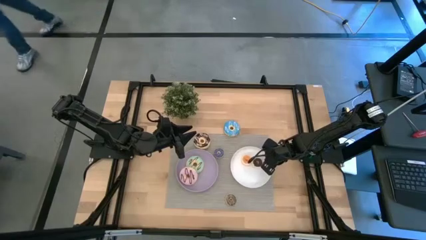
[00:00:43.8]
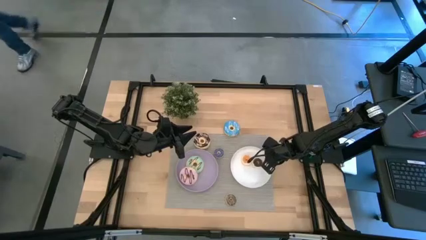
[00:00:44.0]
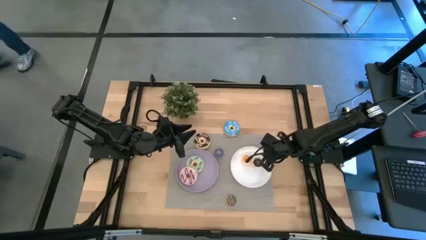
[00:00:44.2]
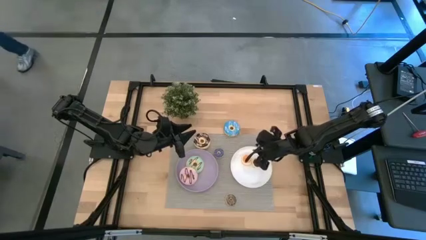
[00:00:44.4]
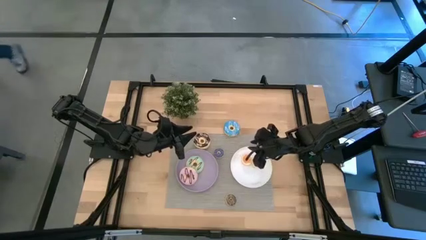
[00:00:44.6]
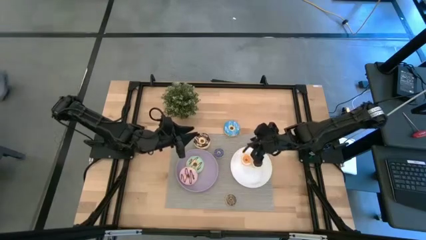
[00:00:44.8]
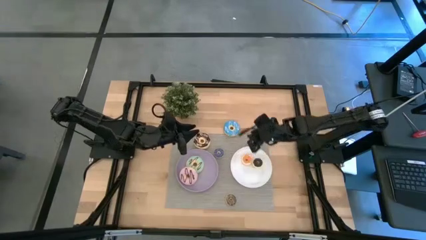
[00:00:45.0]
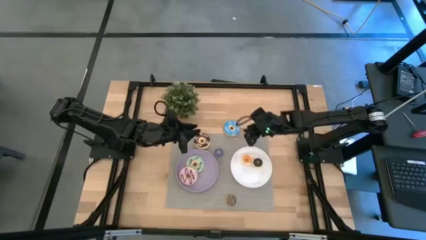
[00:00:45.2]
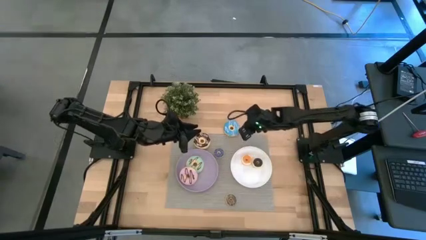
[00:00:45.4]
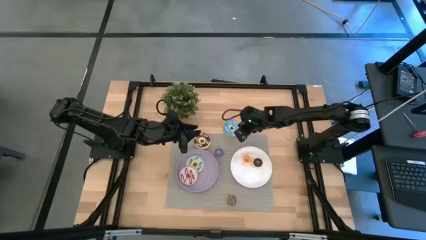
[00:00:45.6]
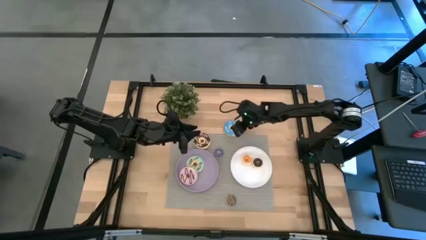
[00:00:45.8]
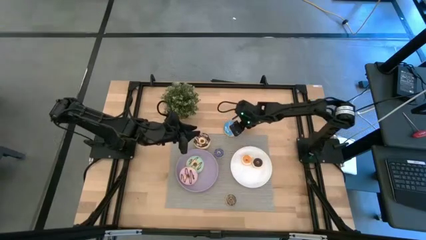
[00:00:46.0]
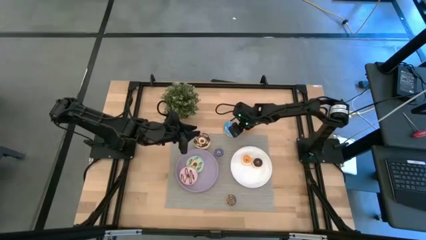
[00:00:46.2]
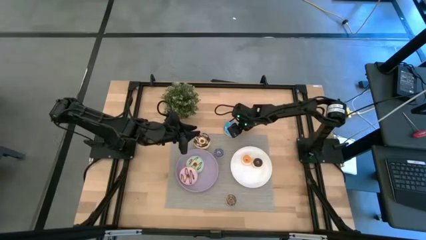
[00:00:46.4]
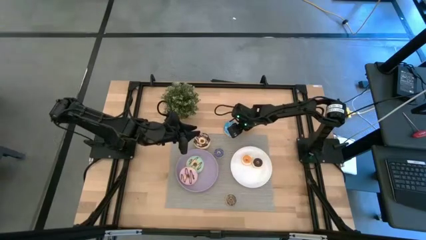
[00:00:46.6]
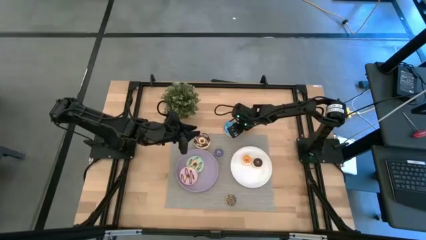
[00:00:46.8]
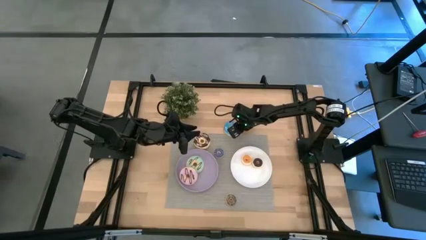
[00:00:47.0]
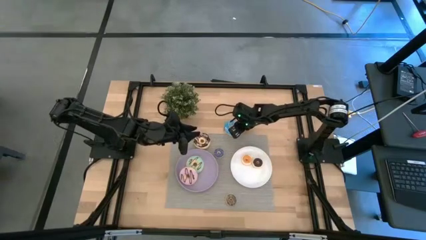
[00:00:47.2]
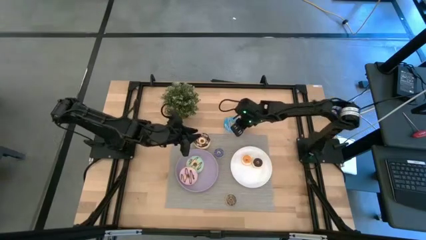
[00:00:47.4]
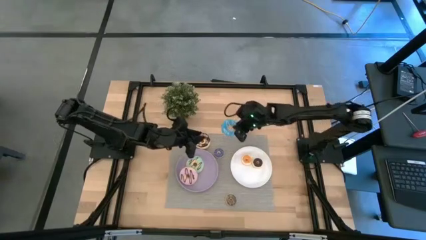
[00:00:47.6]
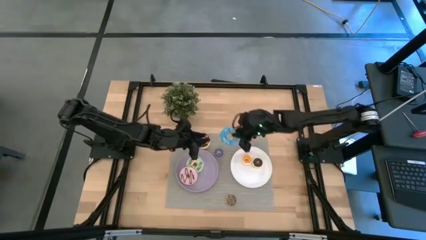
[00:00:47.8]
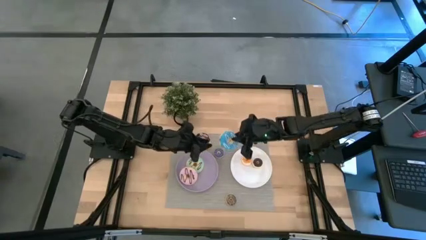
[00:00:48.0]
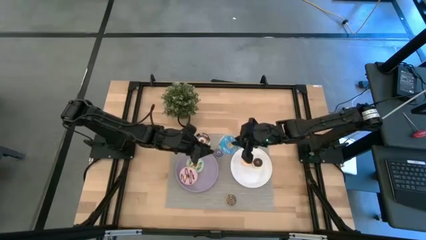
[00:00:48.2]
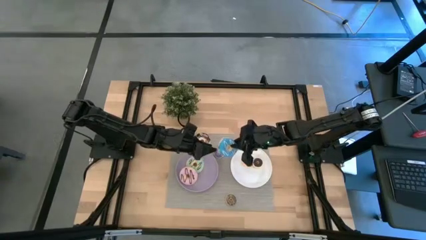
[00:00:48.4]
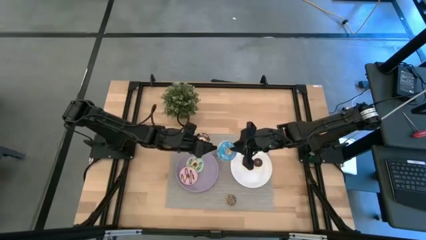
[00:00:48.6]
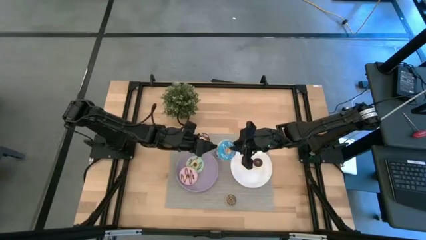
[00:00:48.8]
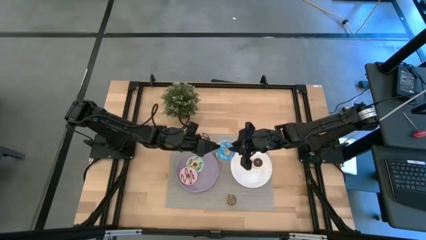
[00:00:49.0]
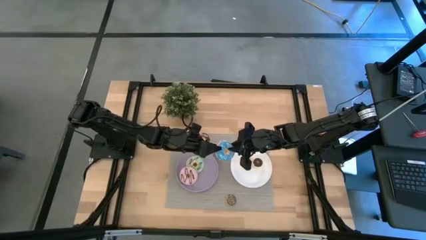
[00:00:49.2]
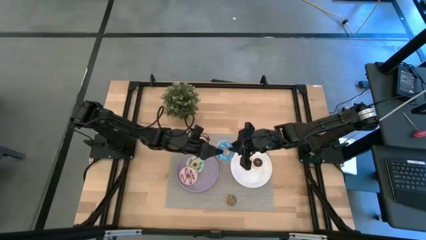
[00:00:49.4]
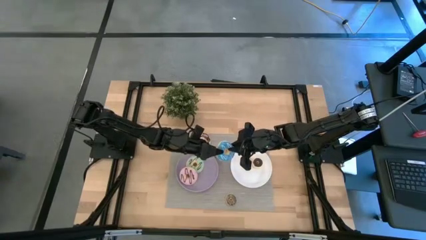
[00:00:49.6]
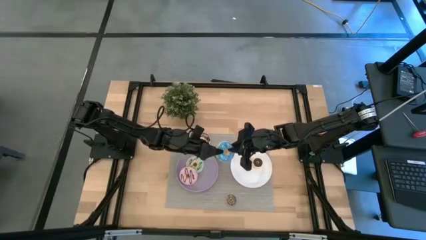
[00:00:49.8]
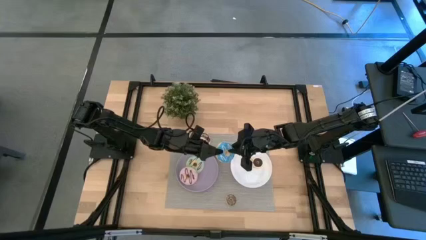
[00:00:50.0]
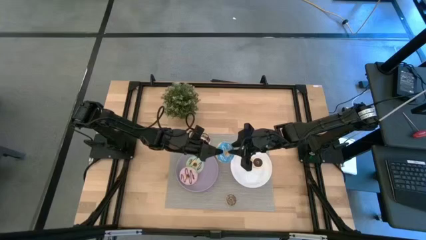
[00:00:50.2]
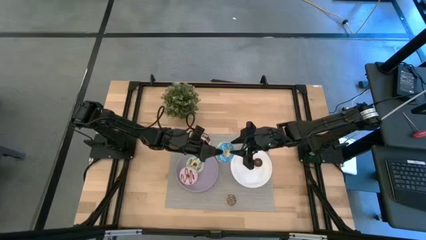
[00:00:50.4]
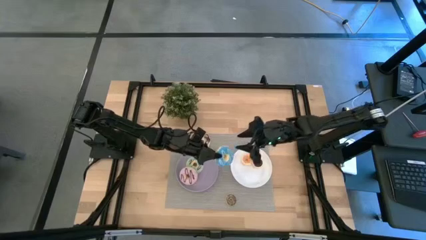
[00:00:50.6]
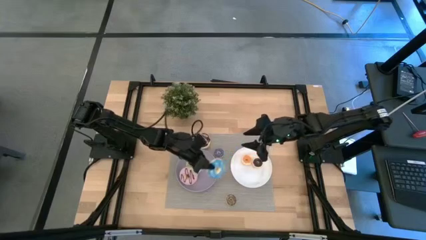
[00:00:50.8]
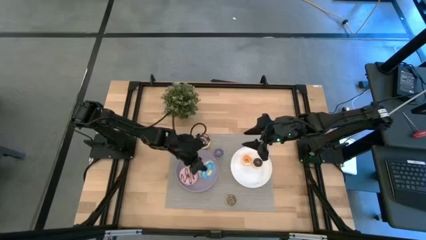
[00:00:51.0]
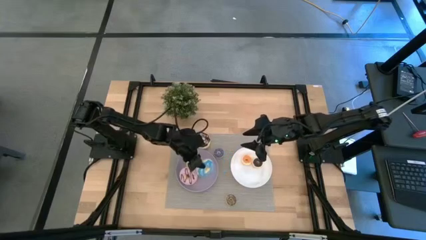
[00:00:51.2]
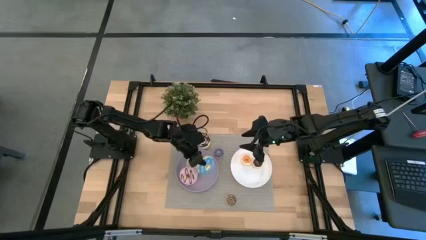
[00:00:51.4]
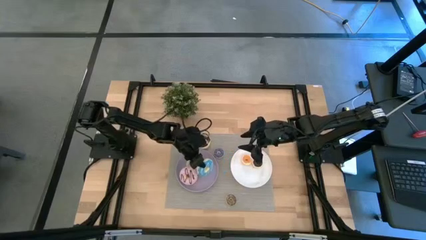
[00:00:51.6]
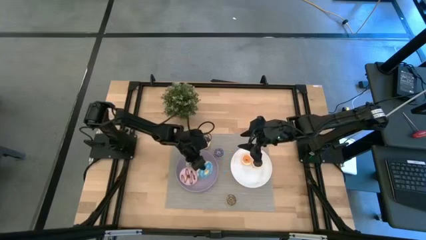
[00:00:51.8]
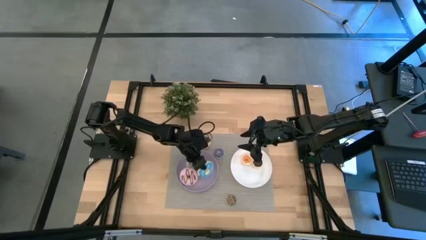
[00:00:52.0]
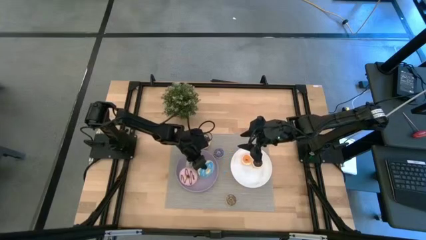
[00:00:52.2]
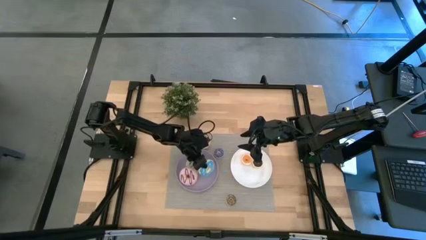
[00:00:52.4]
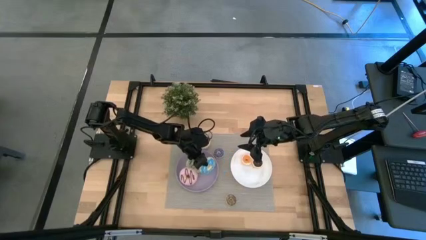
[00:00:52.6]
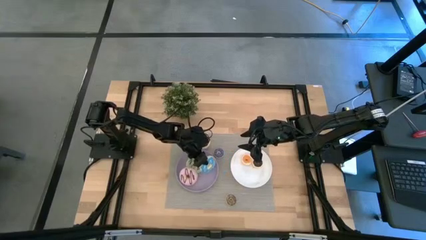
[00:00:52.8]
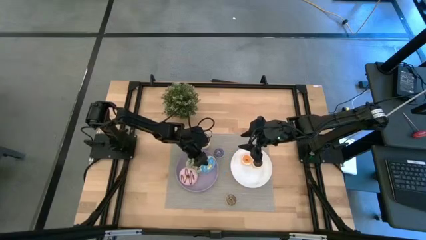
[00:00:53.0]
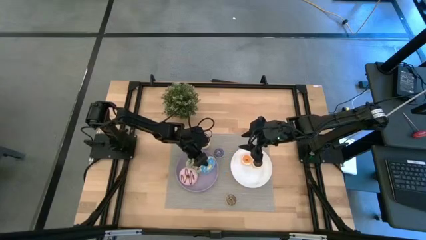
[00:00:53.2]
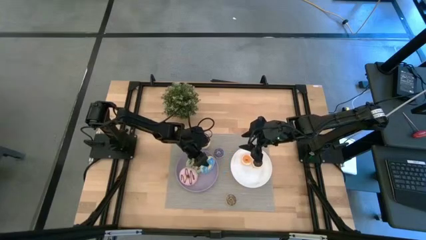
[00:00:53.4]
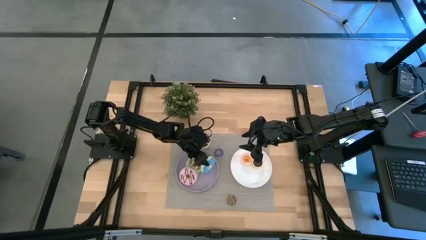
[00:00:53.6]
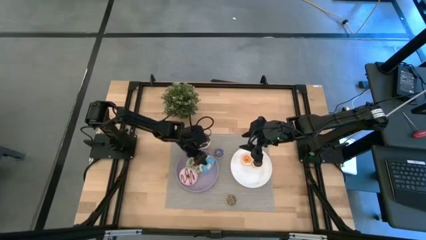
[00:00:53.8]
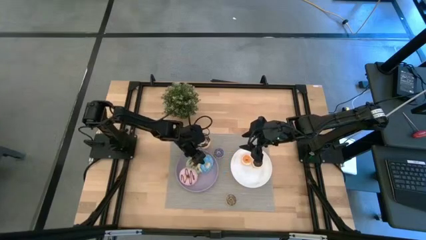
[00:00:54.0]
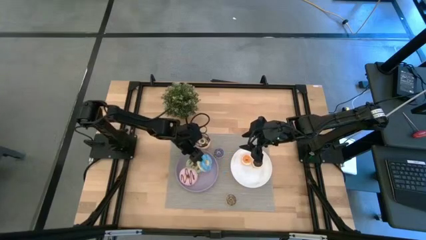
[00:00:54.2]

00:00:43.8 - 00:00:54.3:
Task: Pick & Place donuts
Put the large blue donut on the purple plate

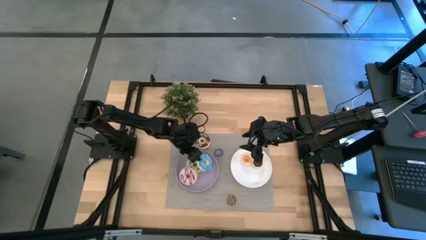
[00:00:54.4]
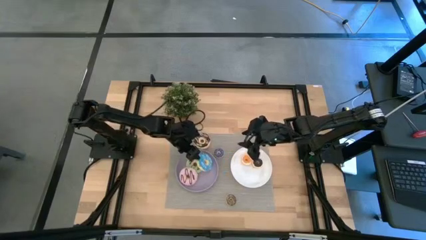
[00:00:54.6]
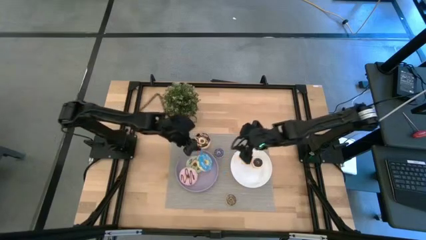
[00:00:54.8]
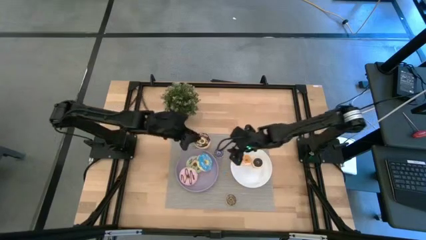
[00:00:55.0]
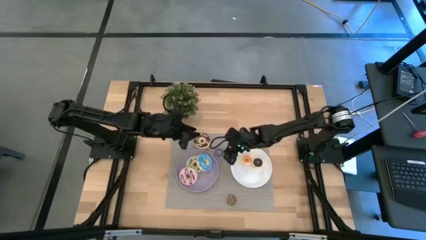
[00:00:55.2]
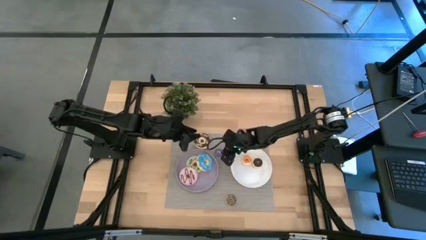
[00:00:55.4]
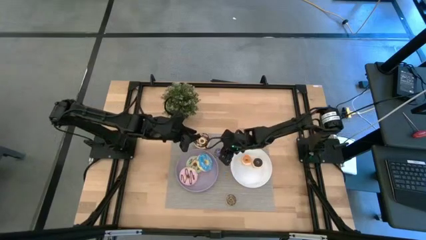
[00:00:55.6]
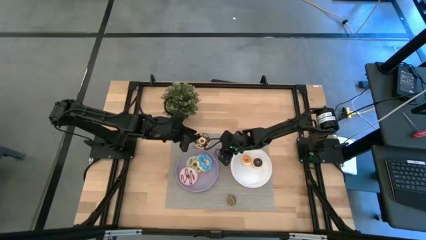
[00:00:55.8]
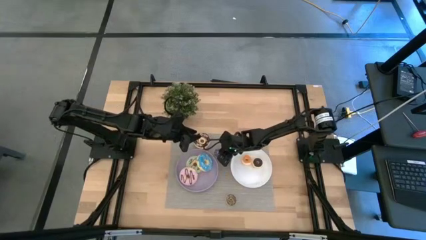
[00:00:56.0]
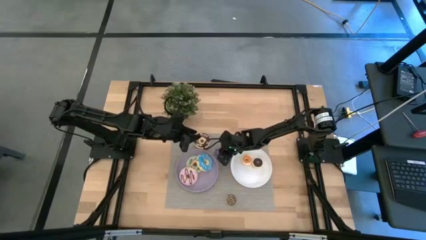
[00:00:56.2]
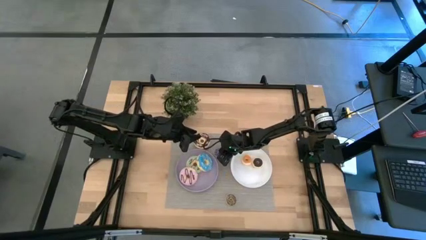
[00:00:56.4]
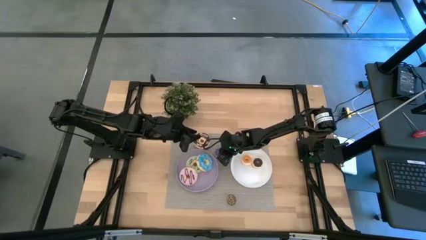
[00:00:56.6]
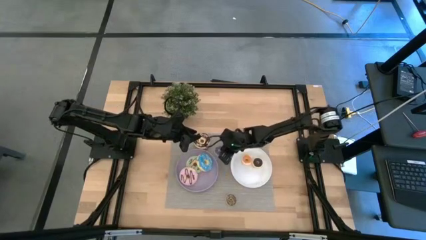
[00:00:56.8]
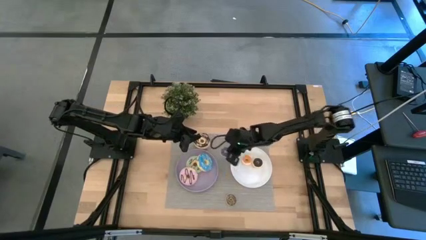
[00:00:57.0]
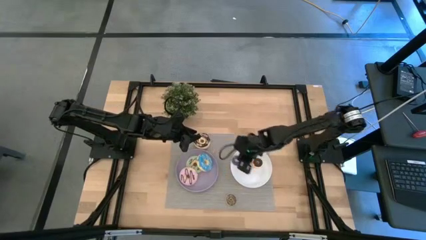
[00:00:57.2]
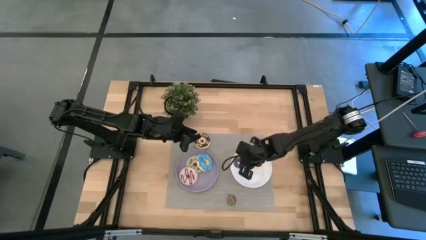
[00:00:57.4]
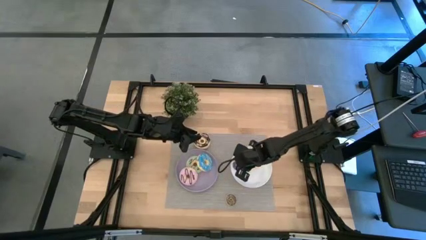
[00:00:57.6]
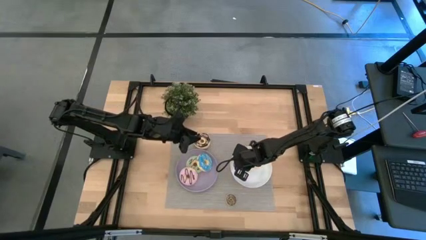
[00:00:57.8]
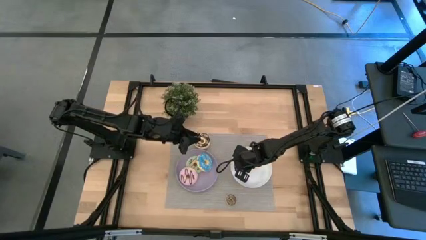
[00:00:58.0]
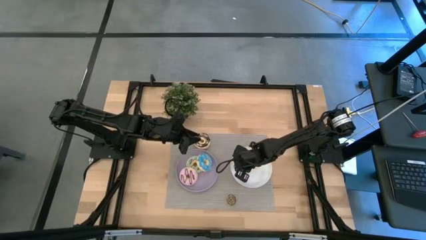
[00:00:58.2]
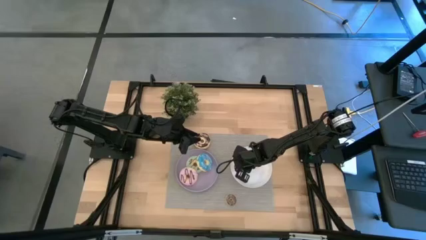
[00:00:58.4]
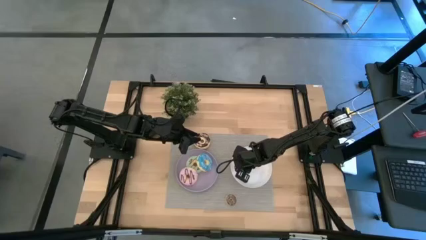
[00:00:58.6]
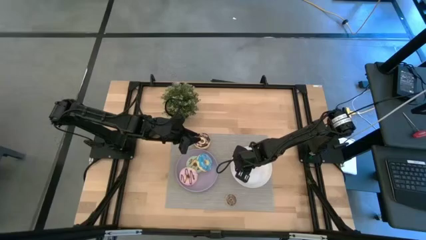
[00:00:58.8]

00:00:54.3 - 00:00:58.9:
Put the small purple donut on the white plate

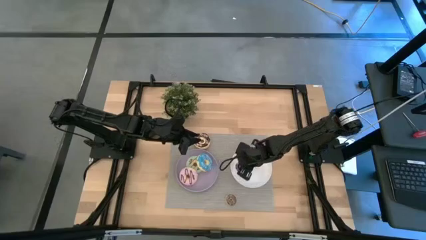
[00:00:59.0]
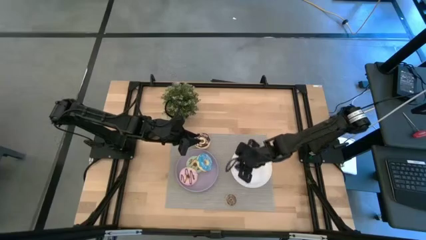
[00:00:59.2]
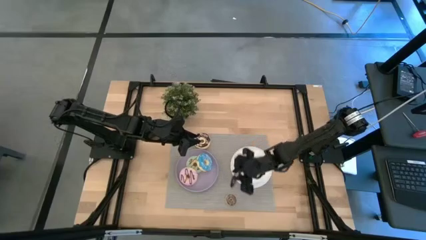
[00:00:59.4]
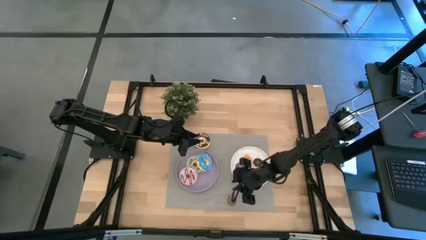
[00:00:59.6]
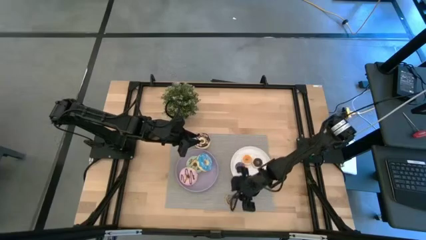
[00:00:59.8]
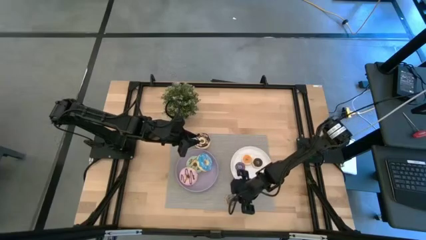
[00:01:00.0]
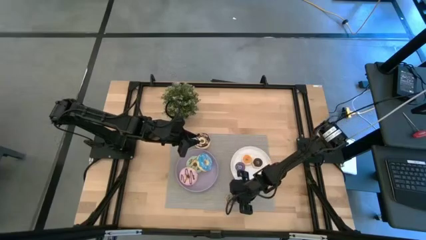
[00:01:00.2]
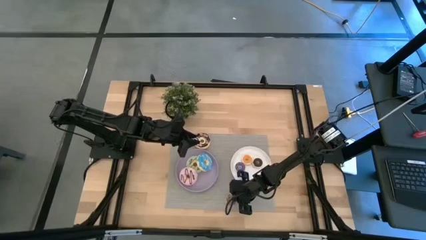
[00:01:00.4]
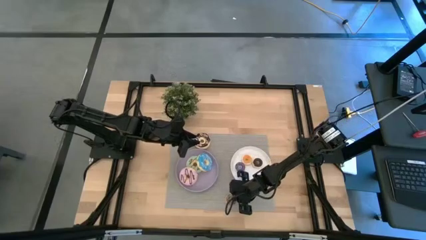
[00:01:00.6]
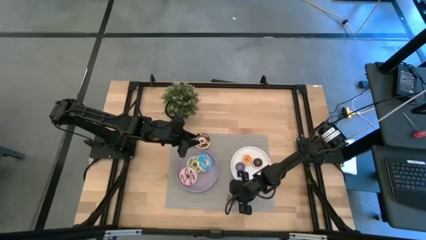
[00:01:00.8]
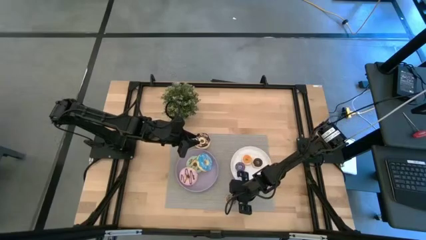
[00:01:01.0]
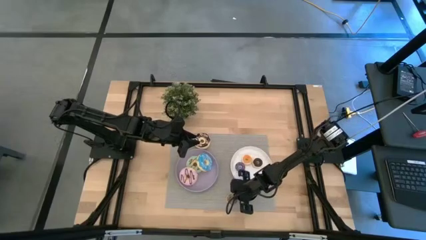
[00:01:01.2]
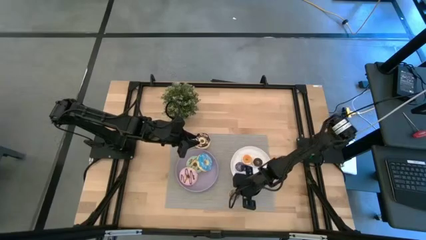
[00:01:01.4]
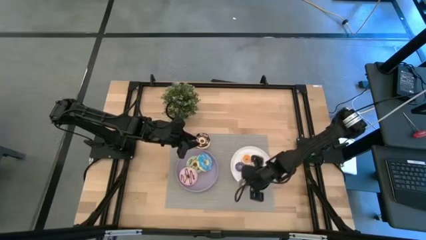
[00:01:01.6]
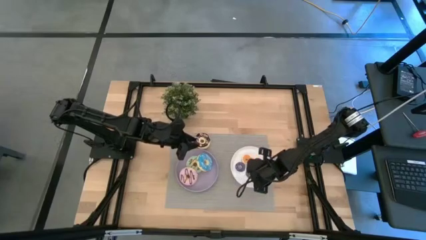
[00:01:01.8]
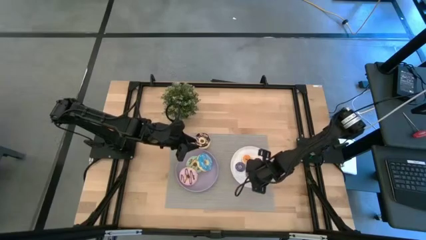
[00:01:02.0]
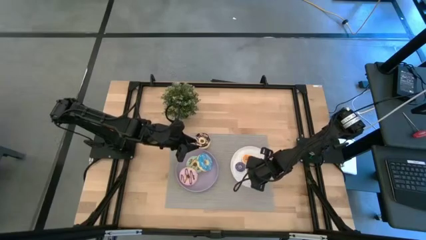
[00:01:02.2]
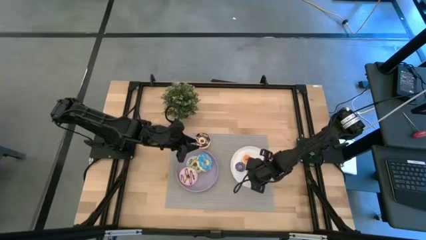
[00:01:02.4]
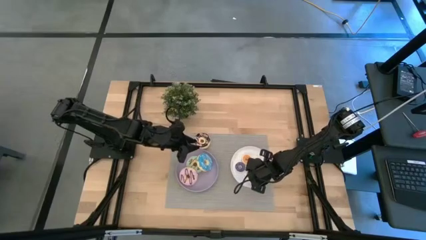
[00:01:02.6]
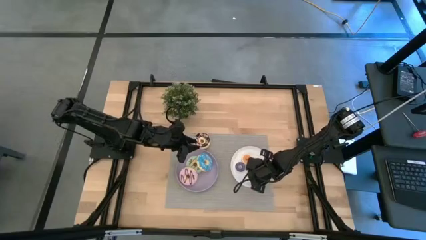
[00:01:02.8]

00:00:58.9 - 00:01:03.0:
Put the small brown donut on the white plate
